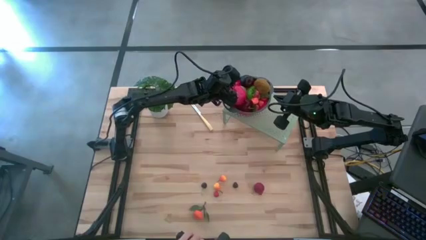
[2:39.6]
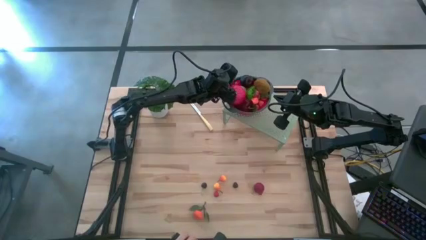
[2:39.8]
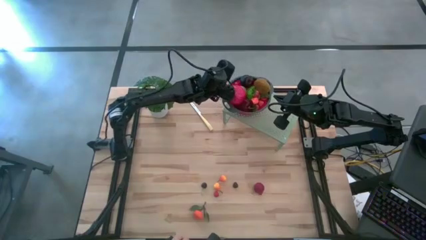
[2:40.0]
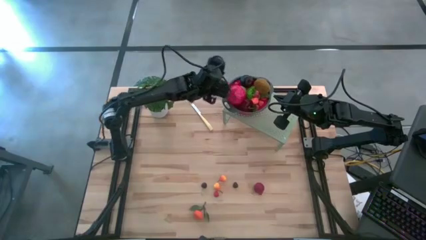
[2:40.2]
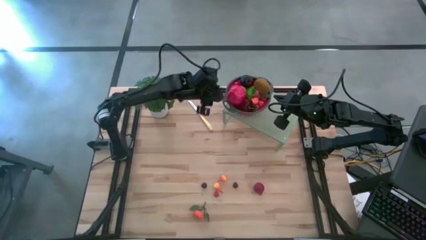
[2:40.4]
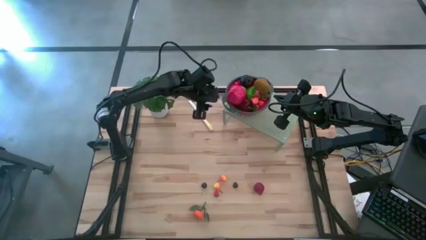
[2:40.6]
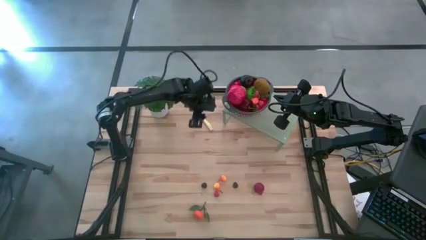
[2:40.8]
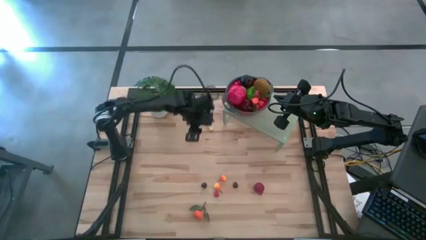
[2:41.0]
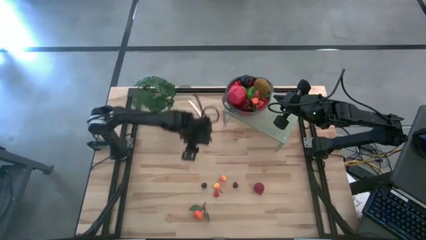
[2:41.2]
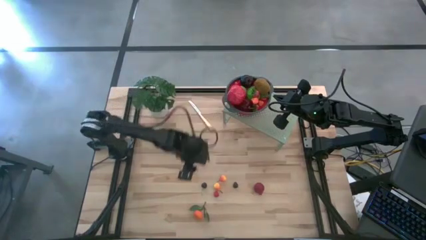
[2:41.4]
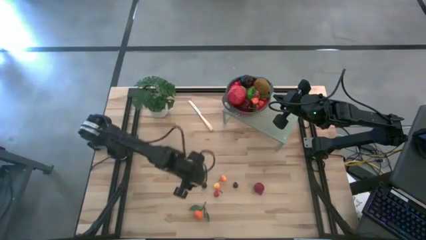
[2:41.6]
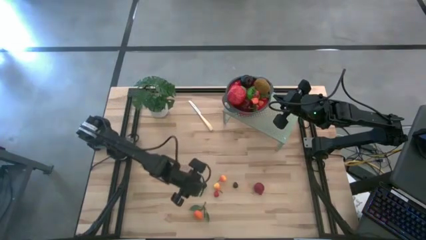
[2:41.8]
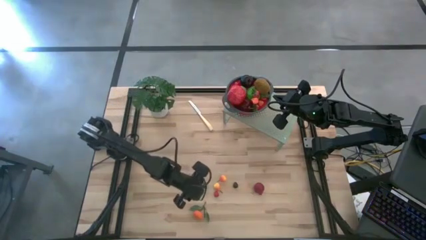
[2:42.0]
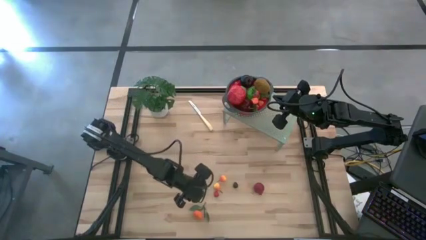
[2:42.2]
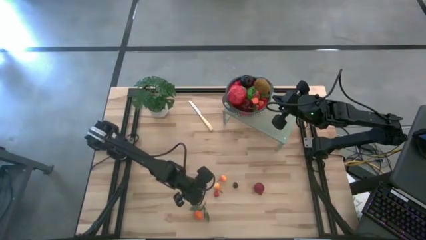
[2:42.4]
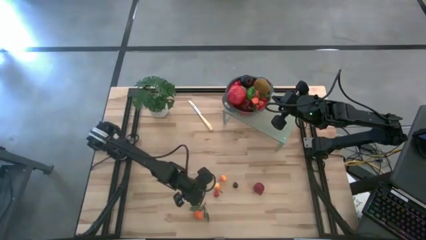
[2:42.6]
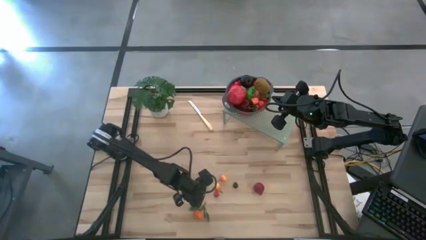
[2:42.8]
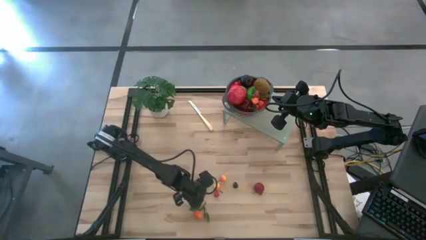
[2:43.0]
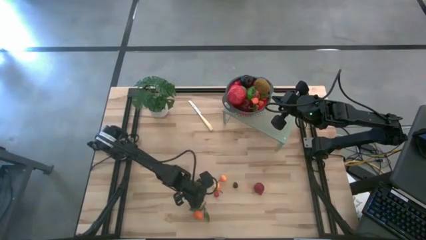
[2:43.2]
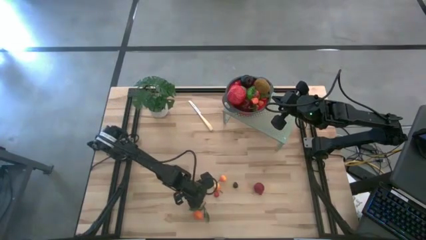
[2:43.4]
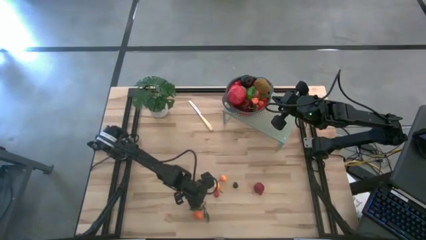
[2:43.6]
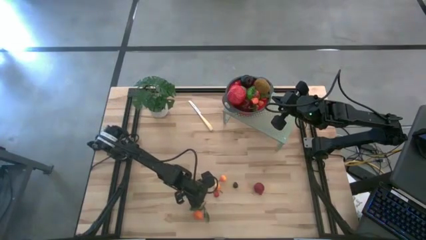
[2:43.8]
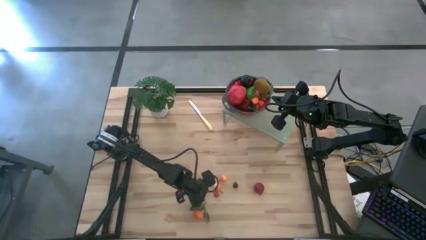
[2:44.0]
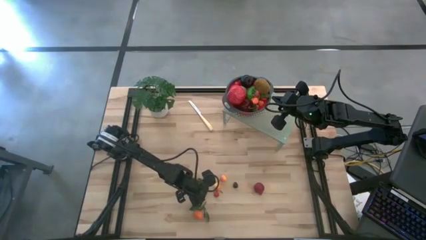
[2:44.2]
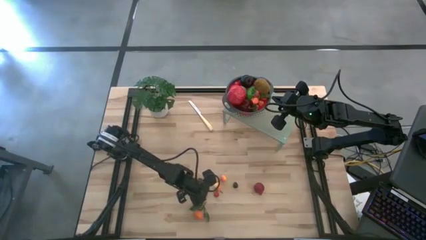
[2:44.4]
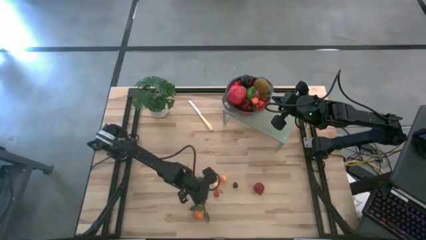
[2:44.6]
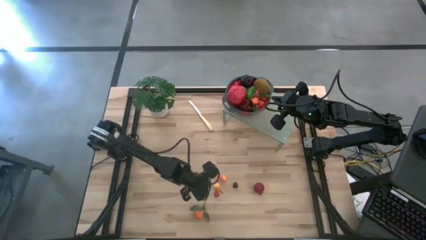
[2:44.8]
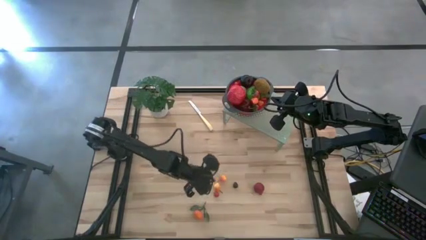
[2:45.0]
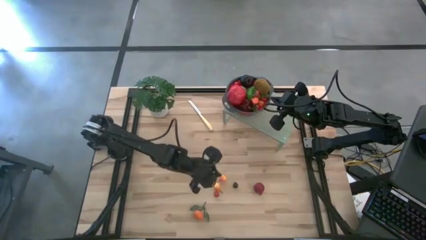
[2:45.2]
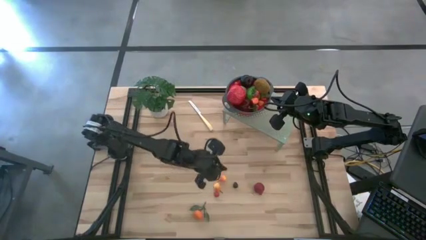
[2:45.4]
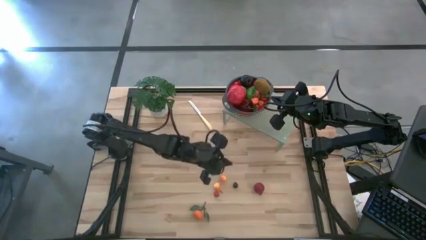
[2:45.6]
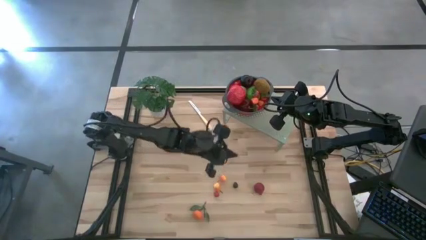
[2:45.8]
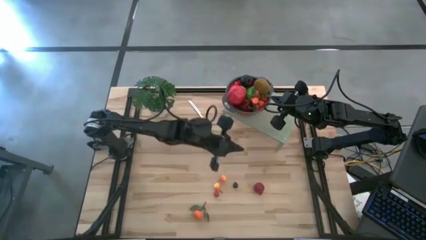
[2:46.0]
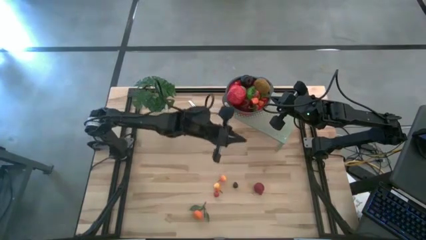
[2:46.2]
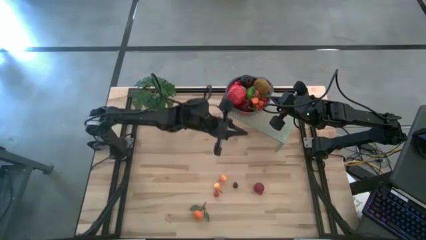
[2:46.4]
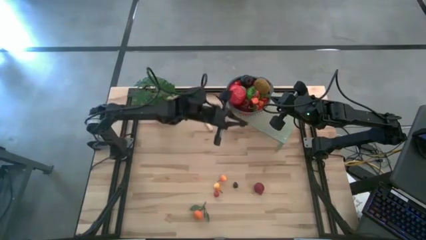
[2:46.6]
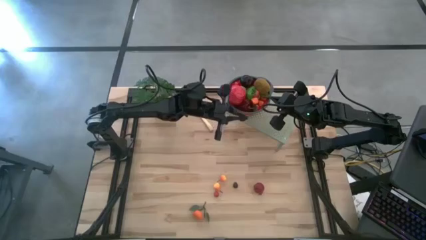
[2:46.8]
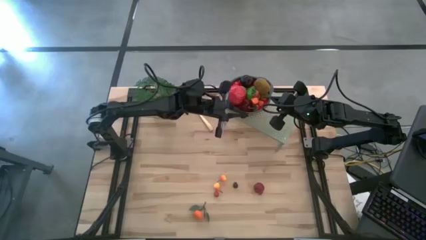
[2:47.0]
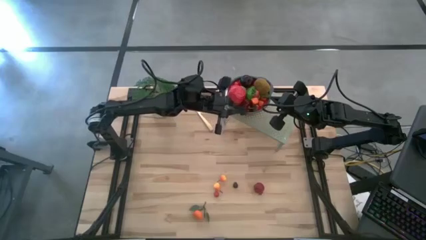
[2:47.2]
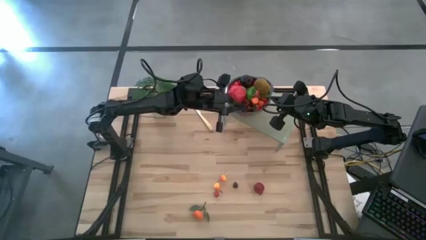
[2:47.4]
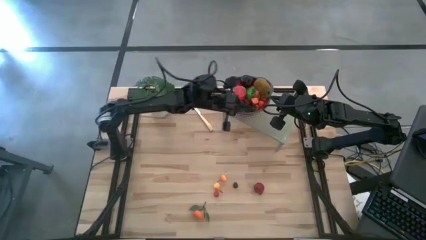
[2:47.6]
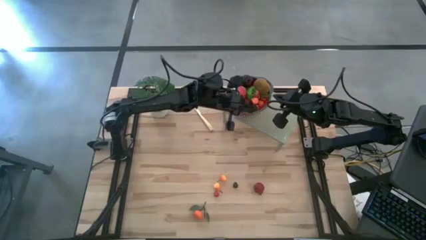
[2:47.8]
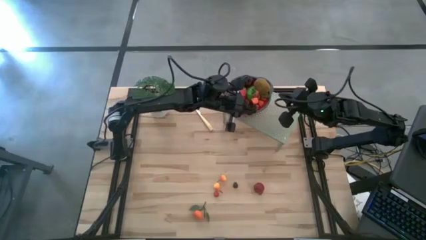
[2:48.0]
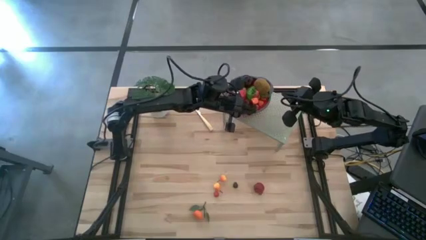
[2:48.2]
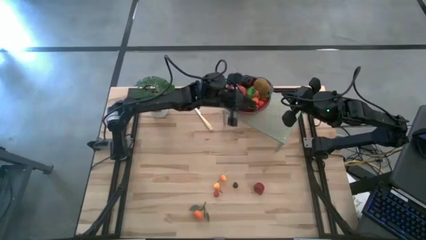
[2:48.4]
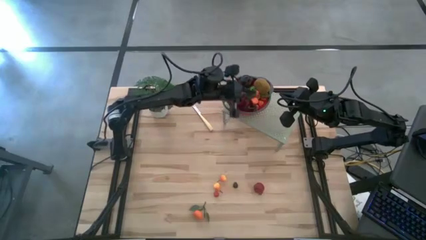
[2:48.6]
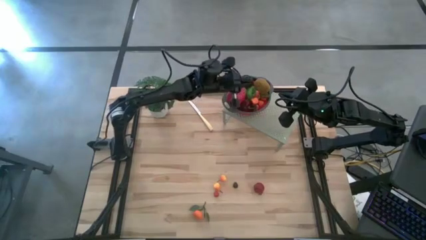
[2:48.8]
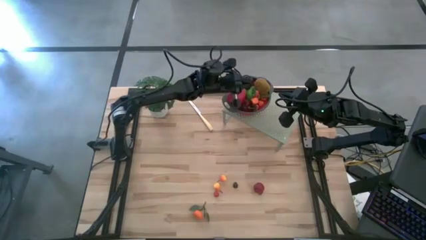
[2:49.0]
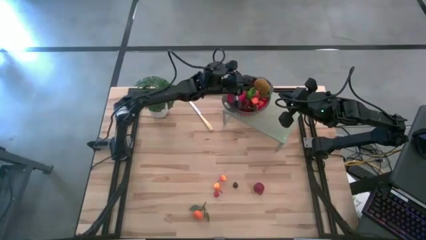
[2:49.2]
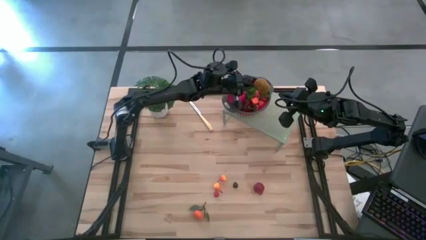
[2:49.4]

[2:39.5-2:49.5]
Task: Pick & Place Fruit
Put the black cherry into the red gray colander on the shelf
